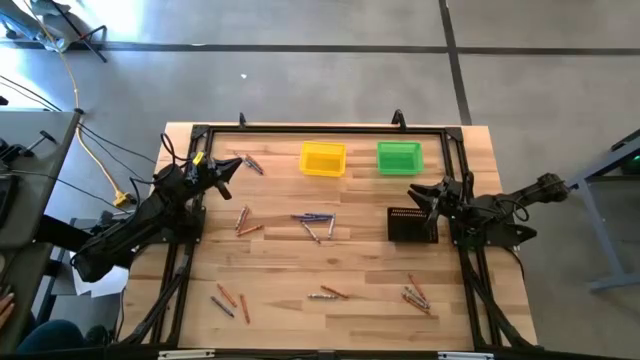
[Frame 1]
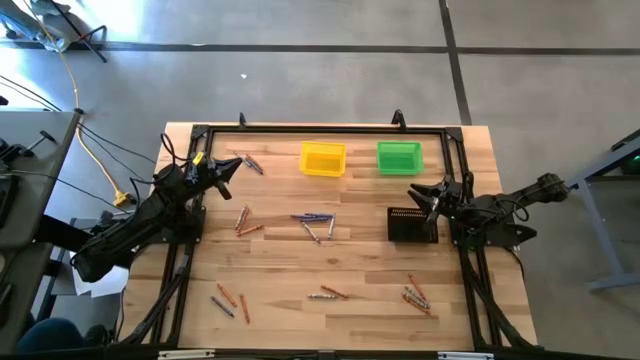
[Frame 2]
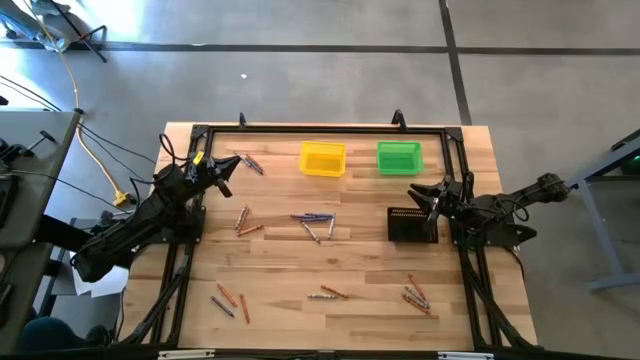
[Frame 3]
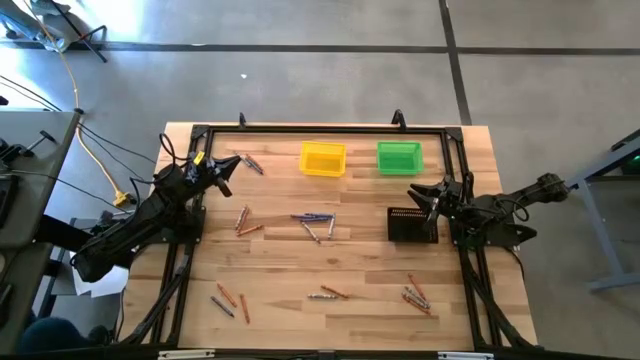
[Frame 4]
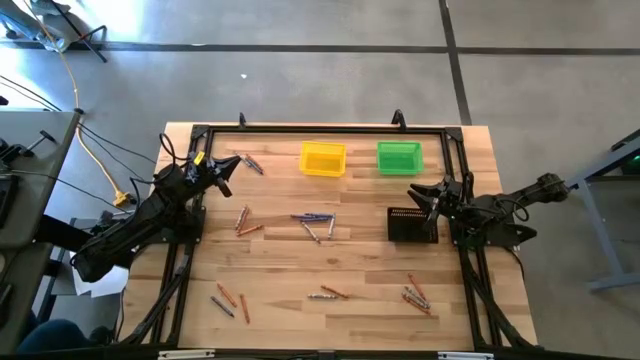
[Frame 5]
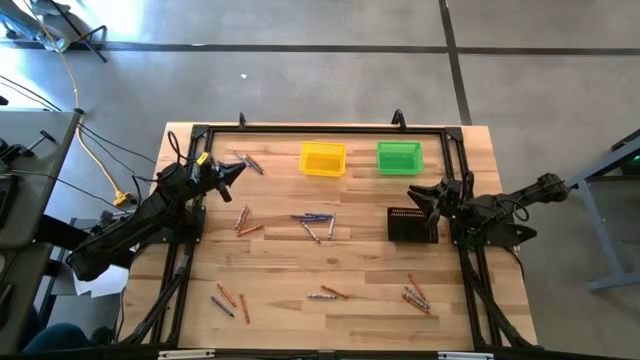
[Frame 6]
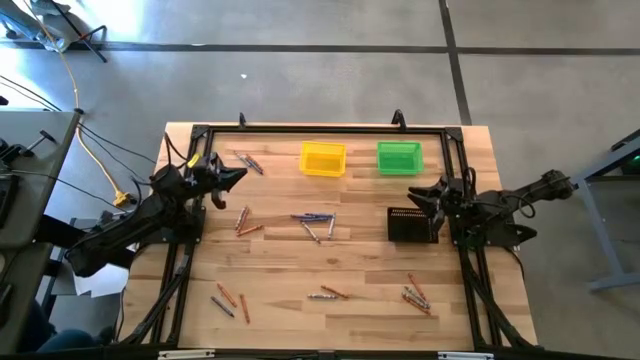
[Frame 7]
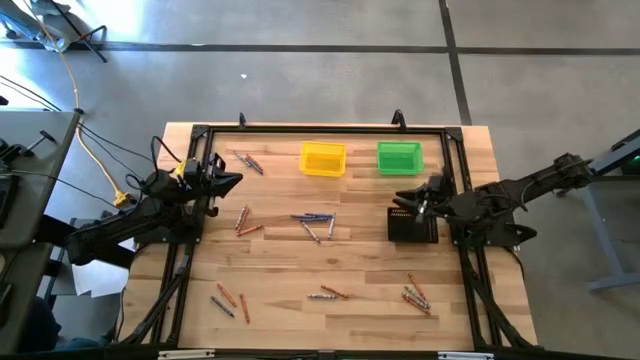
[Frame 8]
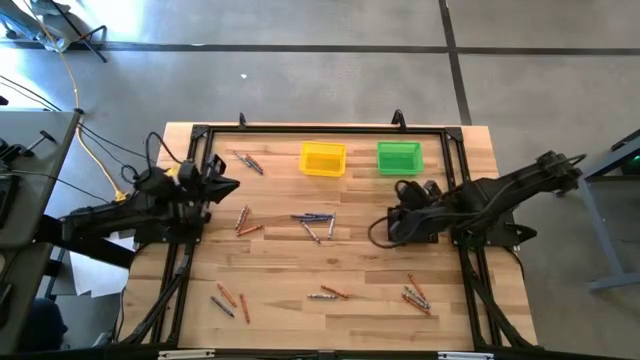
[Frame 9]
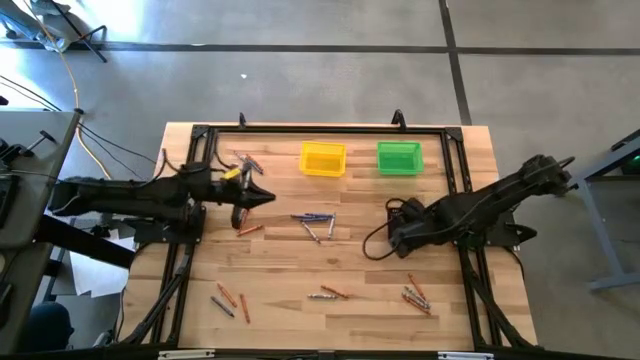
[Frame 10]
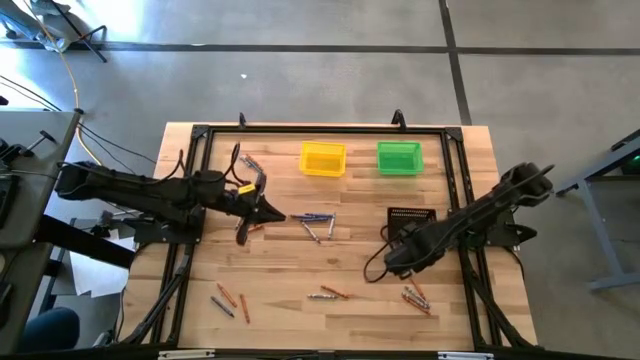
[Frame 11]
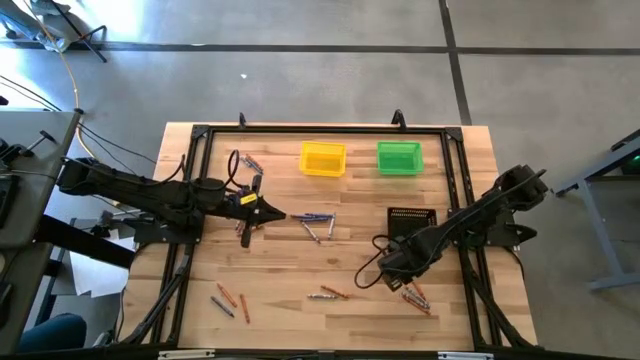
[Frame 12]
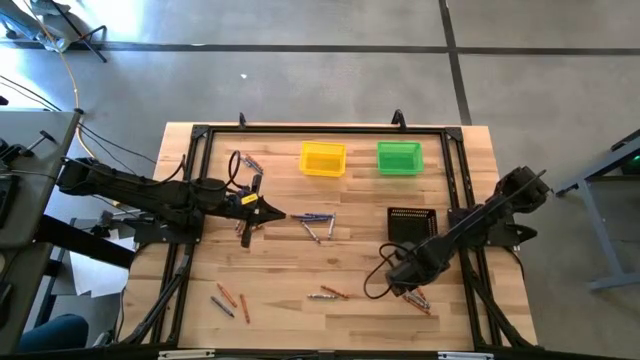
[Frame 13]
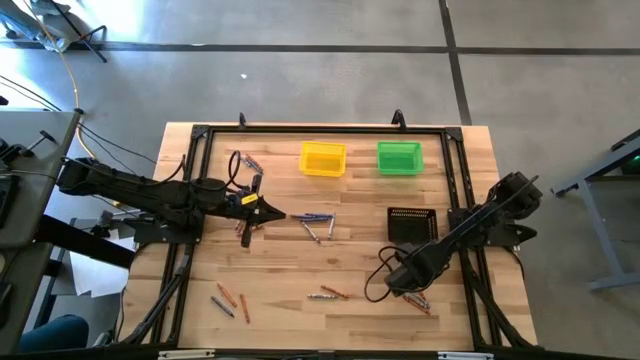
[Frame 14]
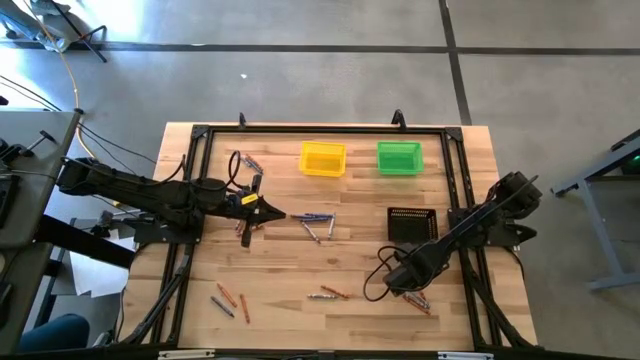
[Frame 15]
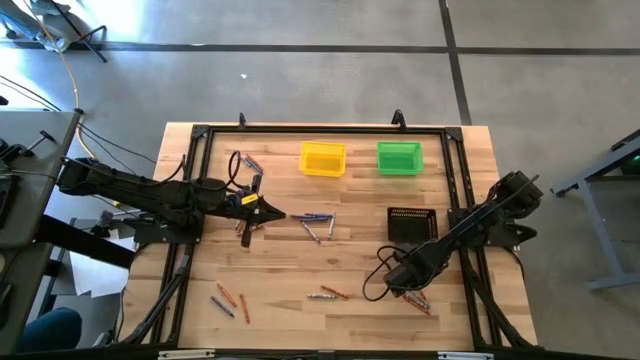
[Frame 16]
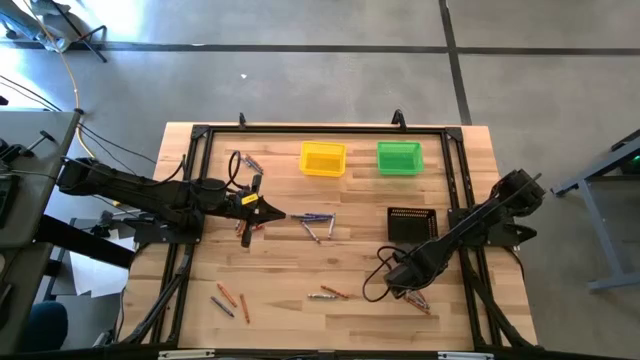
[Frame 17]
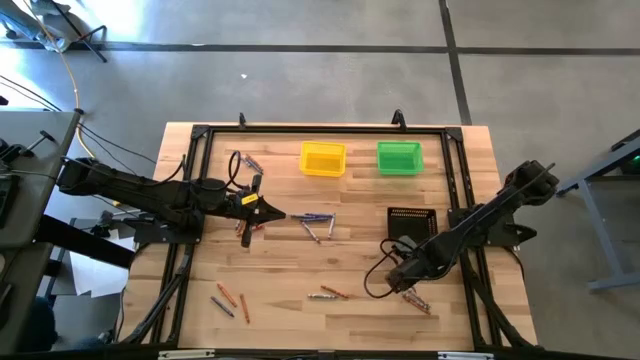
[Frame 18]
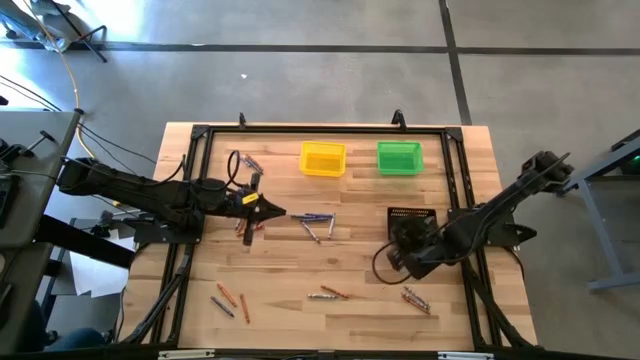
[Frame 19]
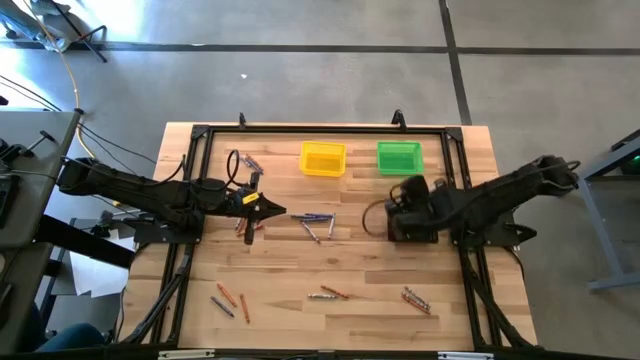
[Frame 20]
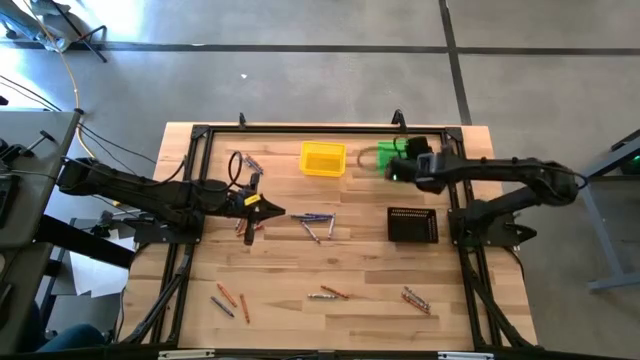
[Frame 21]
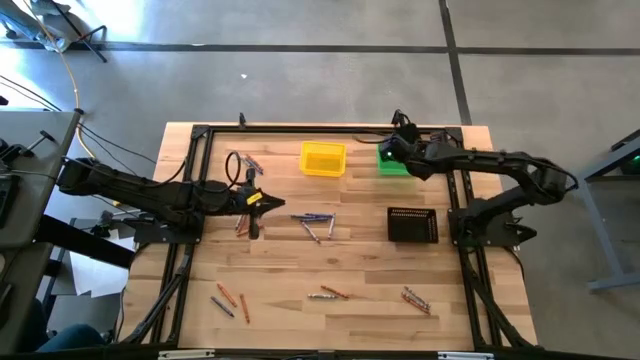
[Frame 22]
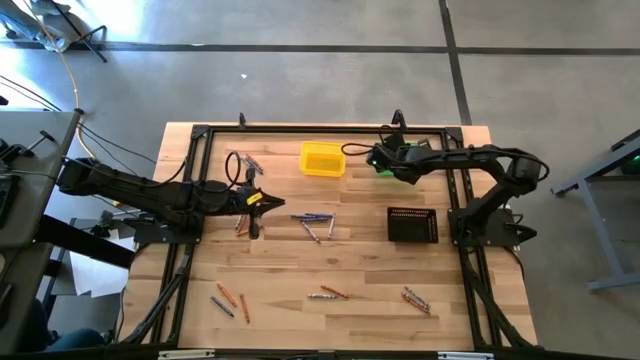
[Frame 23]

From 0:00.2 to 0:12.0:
Task: Sort crayons
Put the orange crayon into the green bin

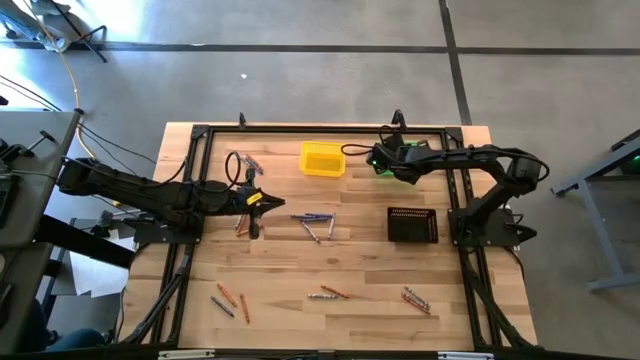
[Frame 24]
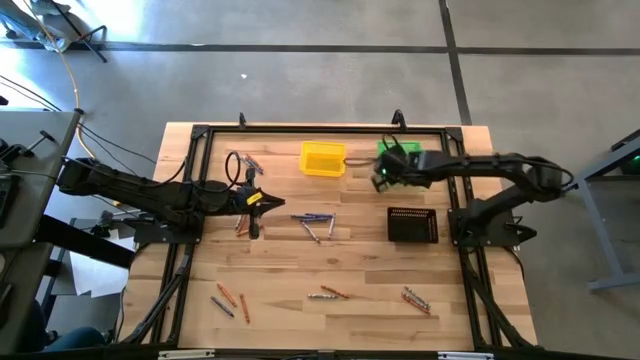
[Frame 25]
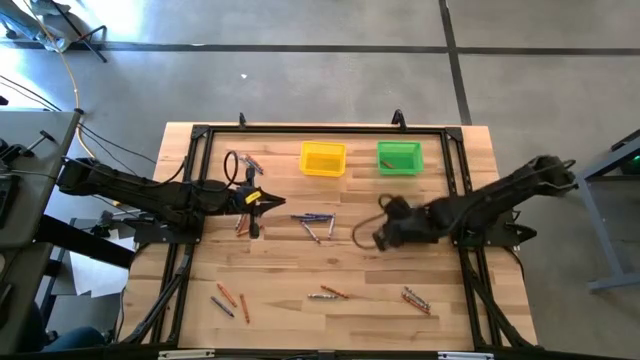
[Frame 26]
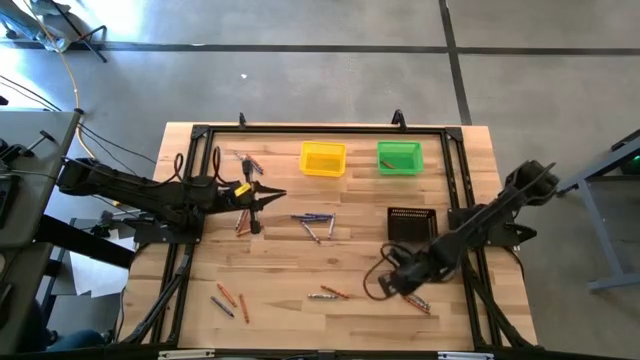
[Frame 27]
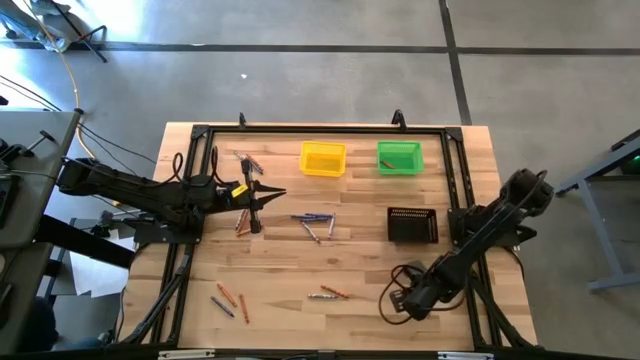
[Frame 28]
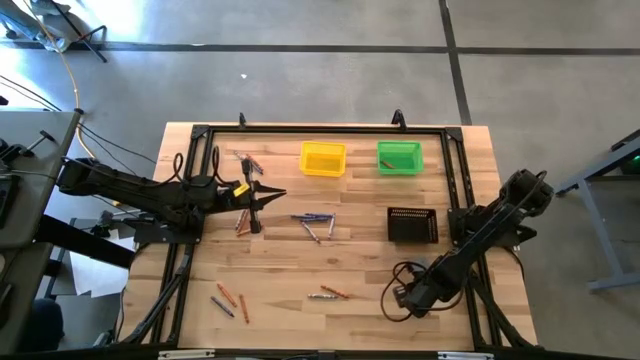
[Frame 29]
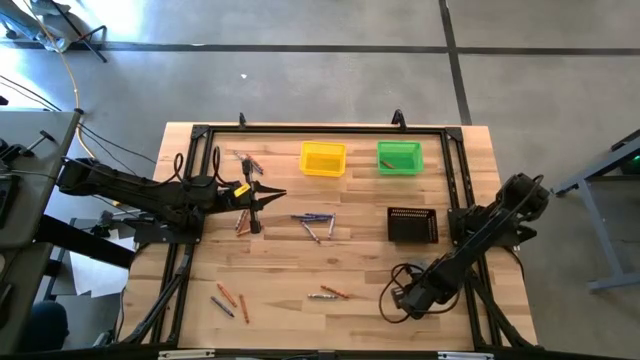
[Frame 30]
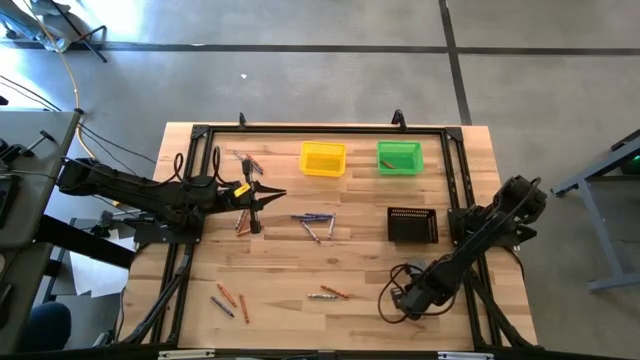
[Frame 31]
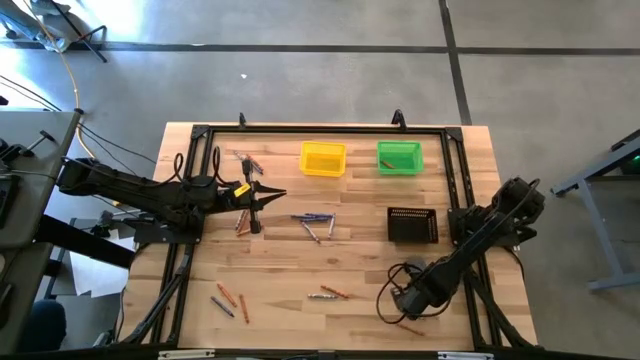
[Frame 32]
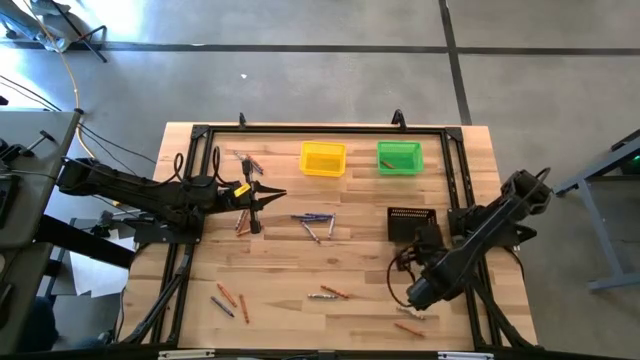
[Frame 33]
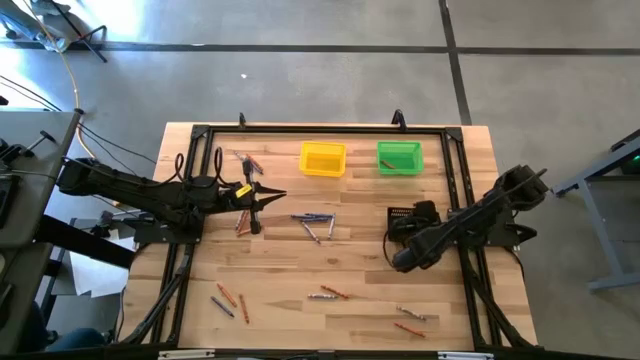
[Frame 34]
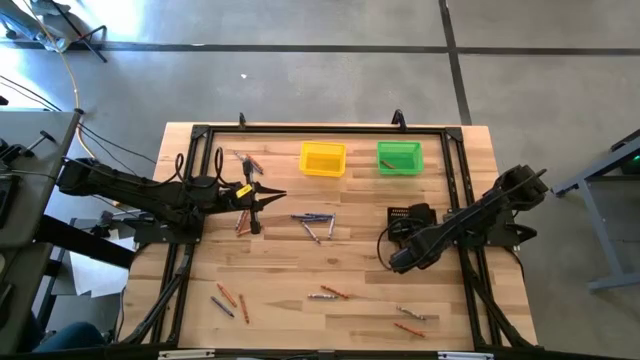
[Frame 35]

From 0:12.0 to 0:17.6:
Put the gray crayon into the black bin

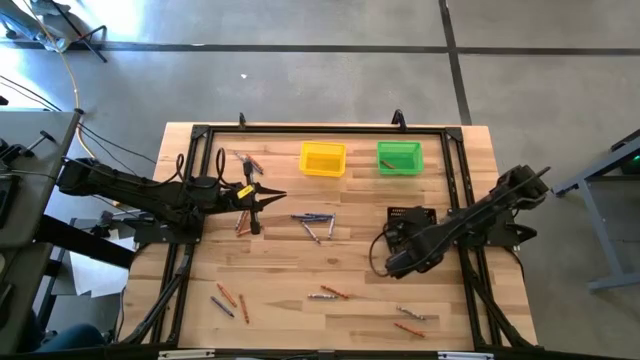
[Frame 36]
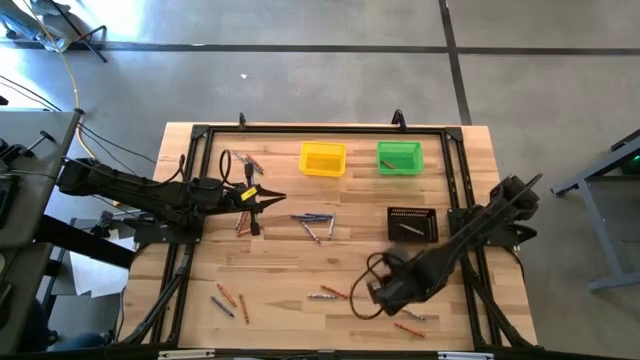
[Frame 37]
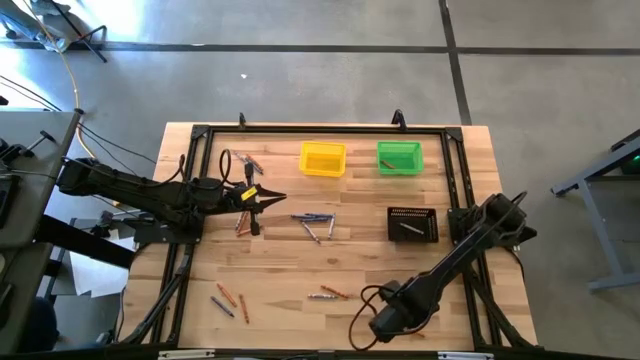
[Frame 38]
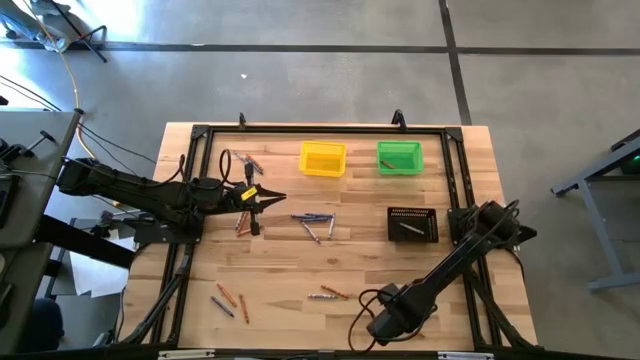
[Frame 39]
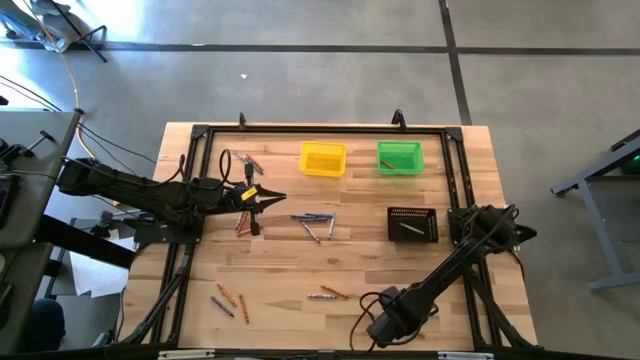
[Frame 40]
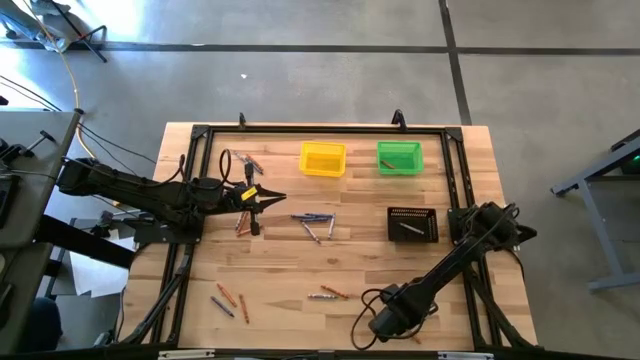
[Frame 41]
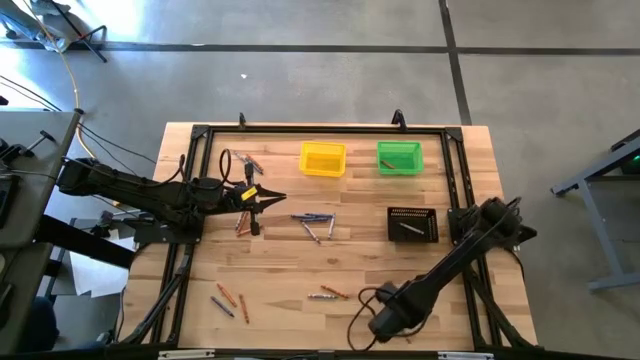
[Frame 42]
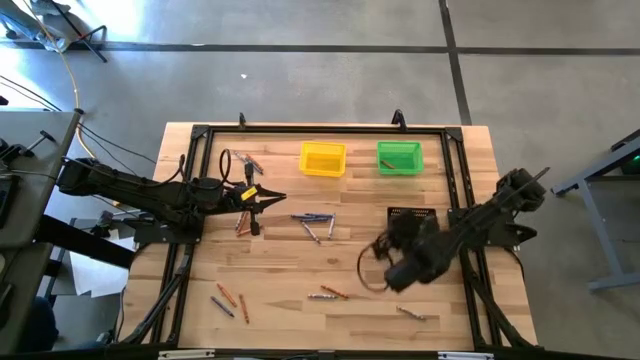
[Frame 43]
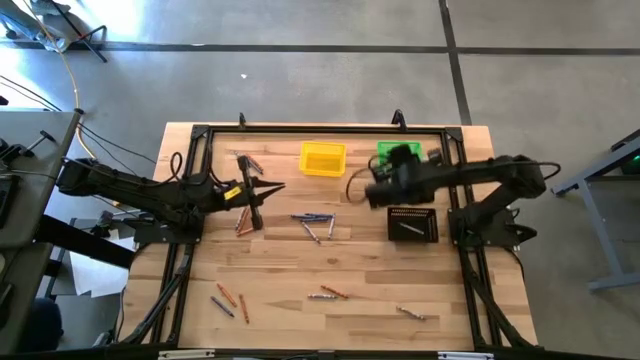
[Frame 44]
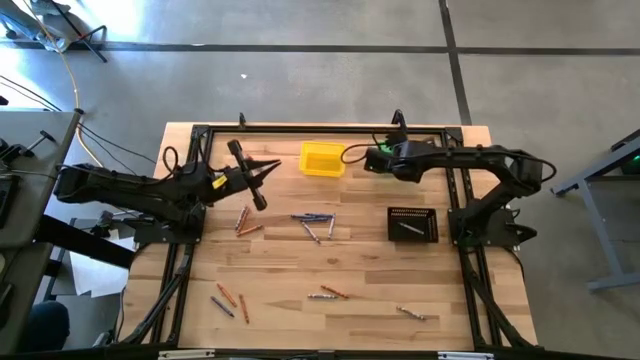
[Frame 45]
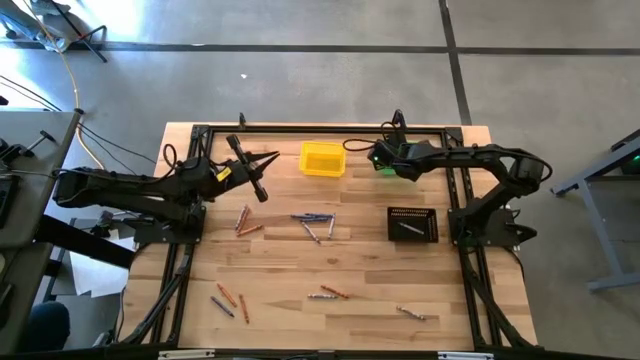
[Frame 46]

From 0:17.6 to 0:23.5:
Put the orange crayon into the green bin
